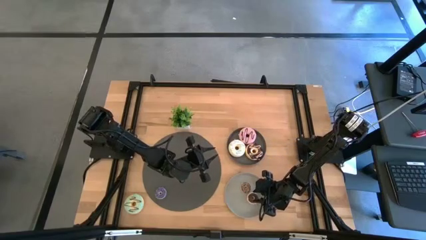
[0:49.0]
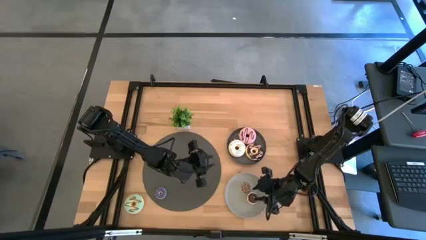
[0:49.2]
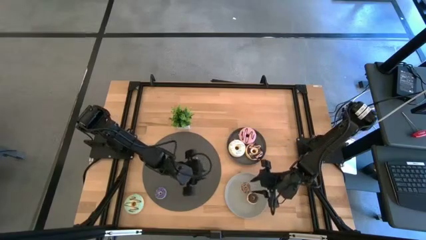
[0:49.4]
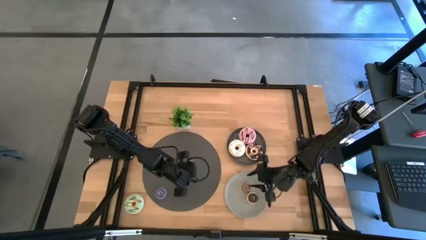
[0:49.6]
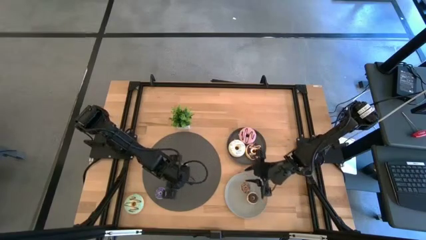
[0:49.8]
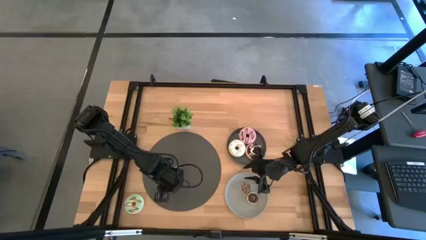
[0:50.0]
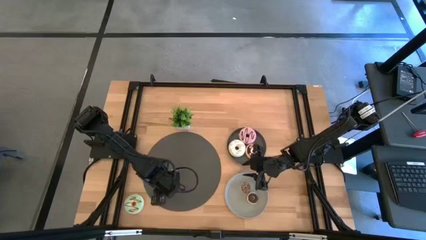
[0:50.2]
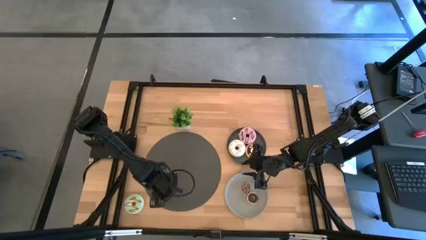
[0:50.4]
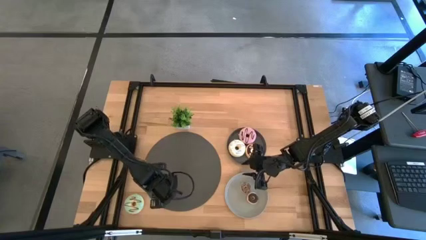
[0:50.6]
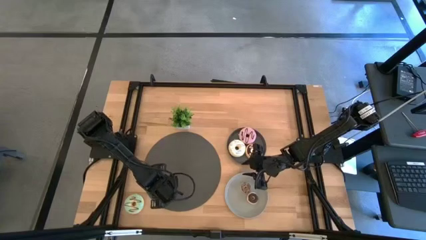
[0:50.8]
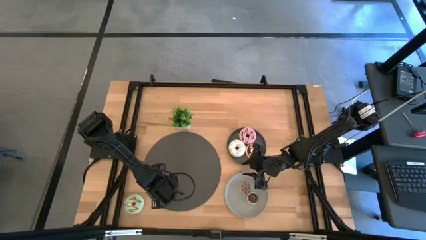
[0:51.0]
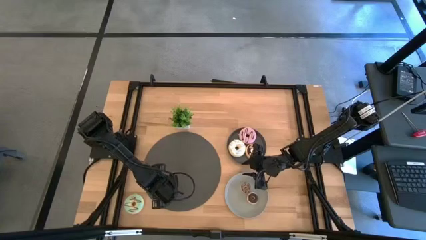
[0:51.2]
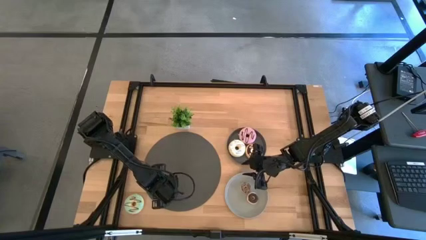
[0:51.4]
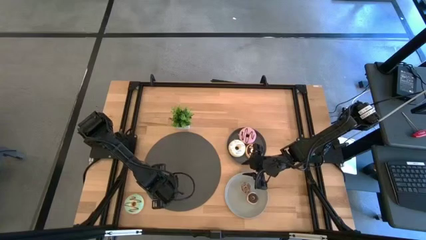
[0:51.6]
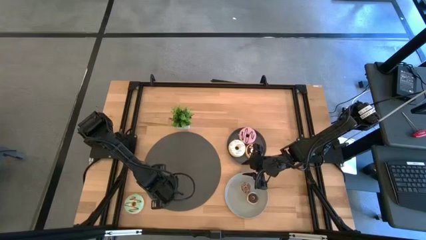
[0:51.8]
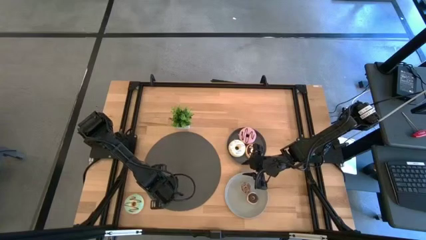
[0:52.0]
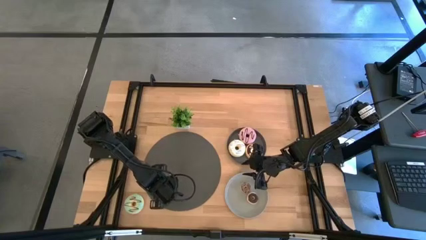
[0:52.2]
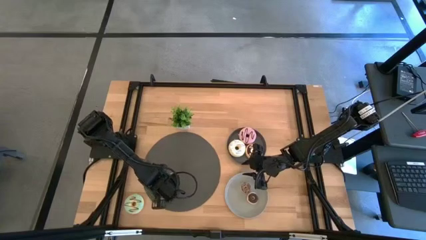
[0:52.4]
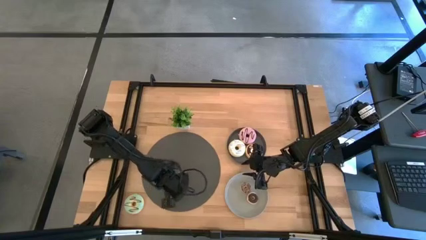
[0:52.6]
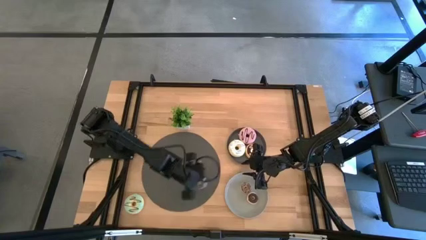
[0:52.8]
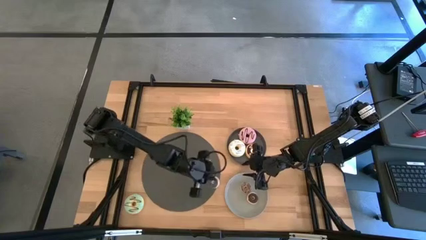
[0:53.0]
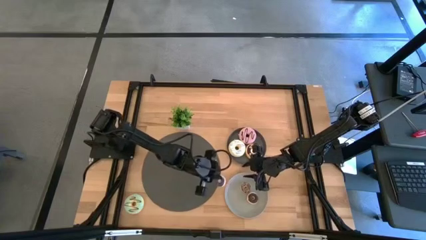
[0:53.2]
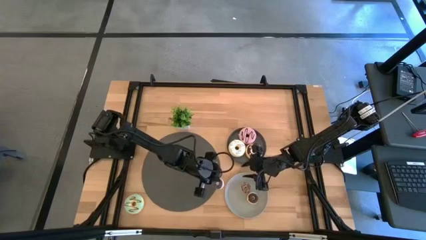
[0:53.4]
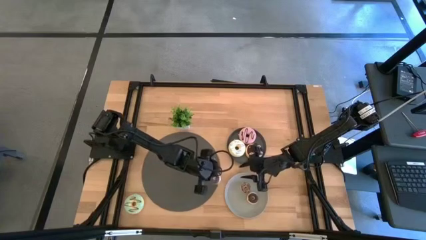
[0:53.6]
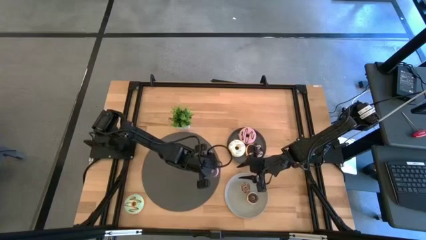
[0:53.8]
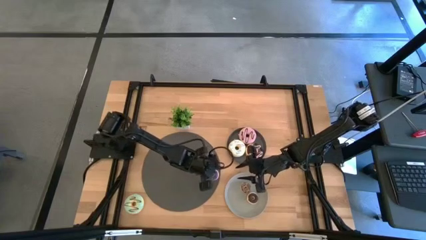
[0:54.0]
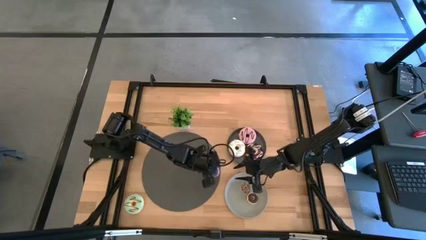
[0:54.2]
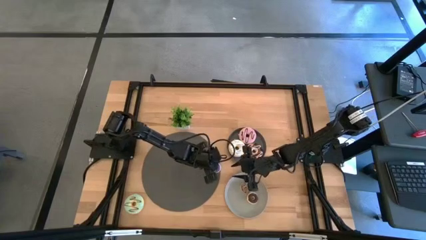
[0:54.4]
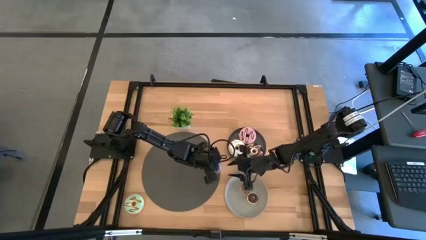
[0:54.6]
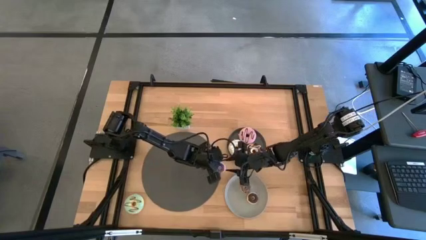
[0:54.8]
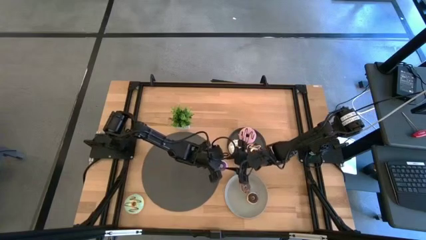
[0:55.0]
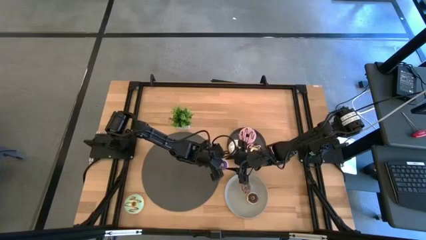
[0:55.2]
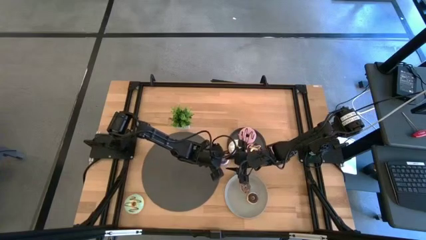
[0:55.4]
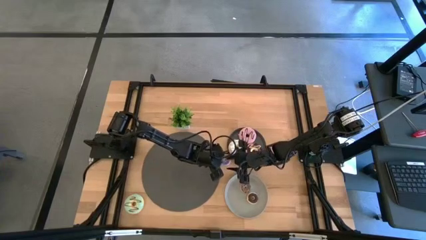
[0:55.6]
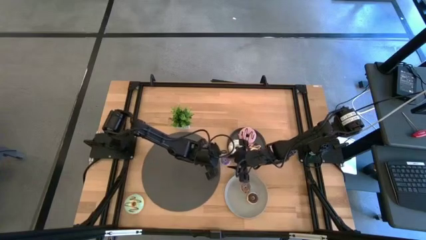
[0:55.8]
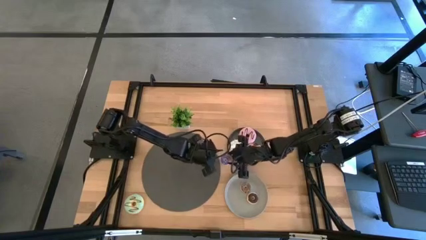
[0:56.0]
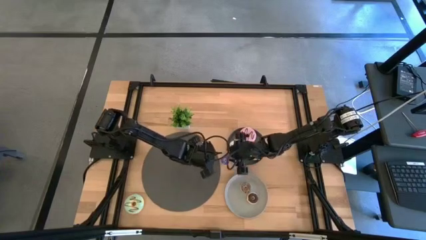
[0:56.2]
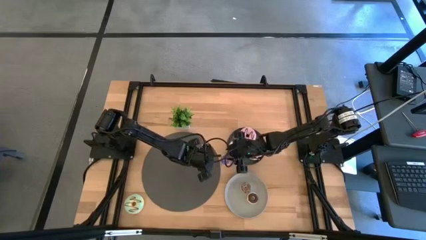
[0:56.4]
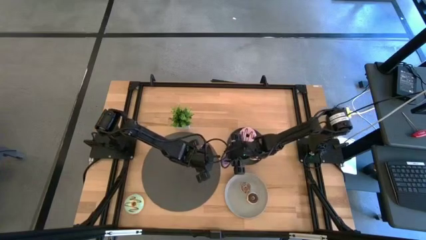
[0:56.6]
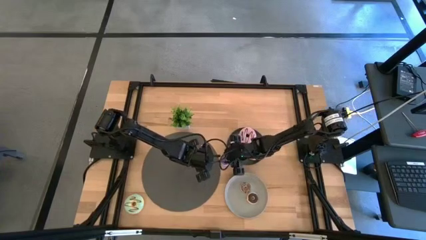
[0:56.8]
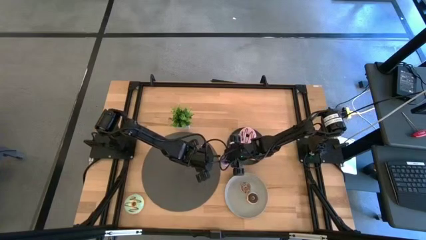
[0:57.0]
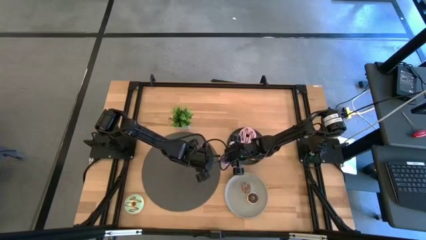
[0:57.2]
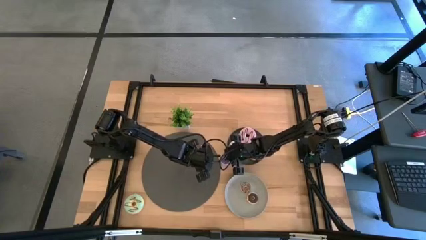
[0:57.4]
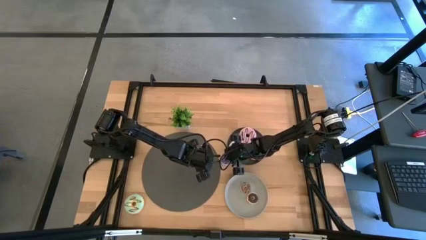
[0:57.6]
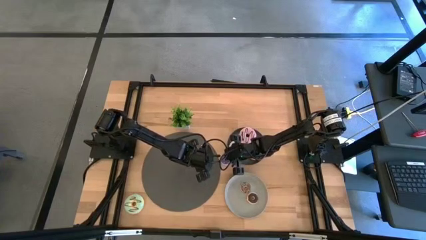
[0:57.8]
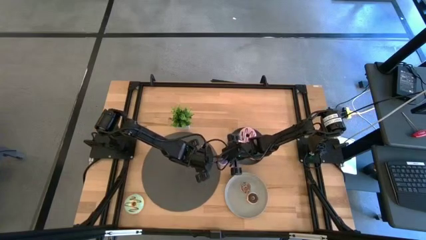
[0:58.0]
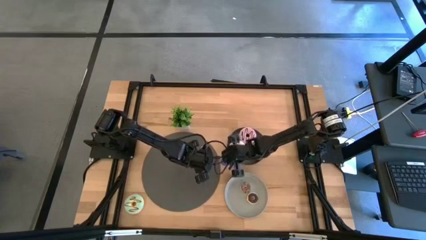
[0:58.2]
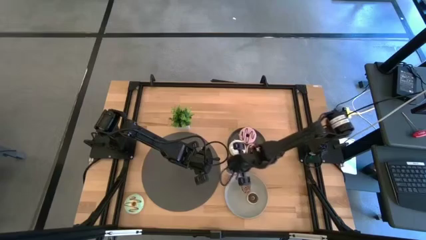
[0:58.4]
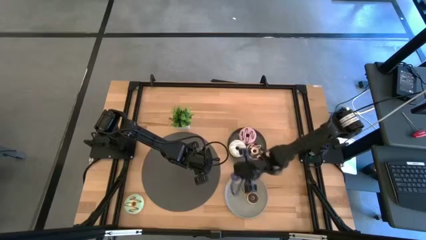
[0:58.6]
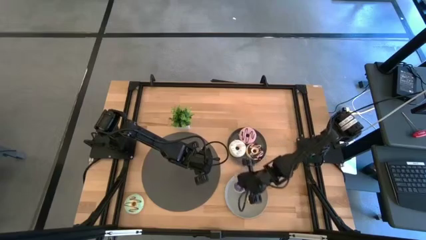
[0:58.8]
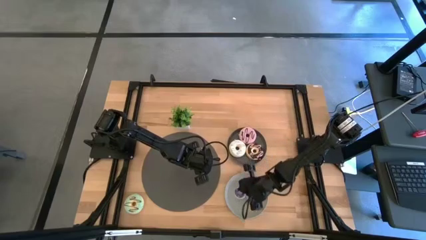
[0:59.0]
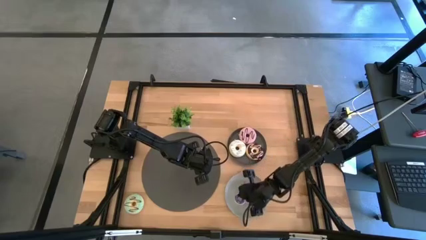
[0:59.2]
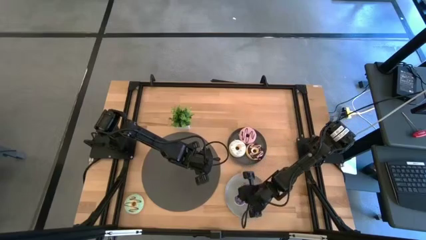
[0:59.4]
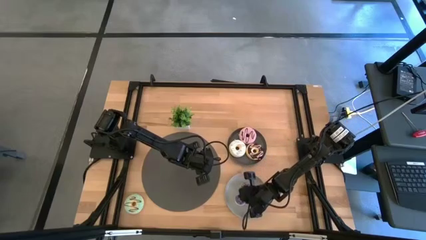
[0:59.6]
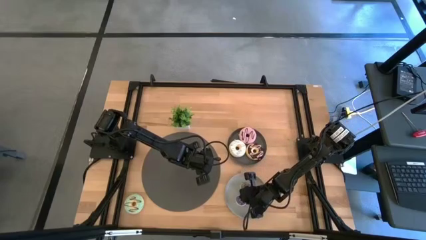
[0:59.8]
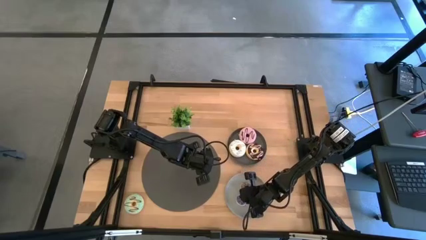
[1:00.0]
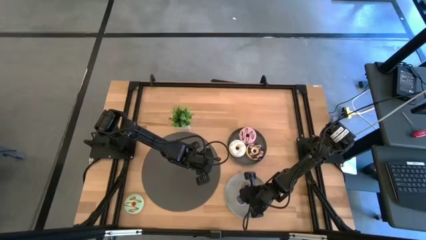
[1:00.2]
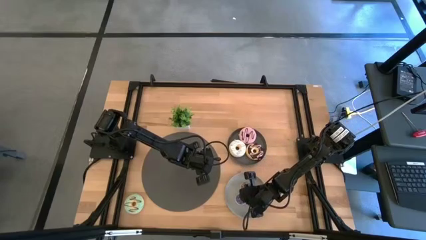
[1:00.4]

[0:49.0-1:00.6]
Task: Pick & Place donuts
Put the small blue donut on the gray plate

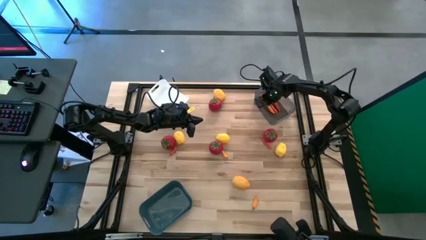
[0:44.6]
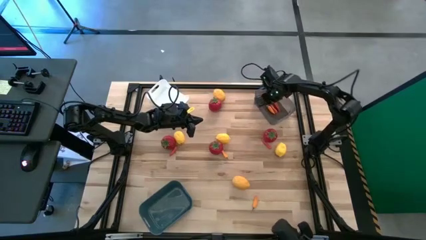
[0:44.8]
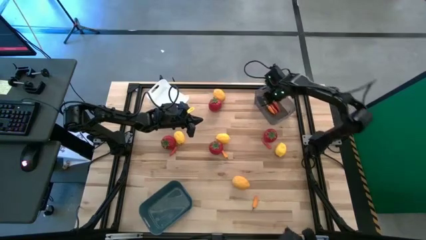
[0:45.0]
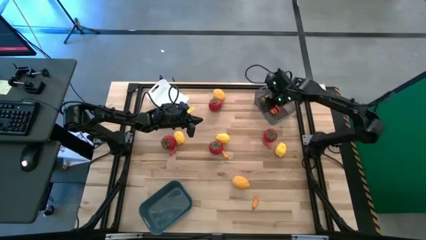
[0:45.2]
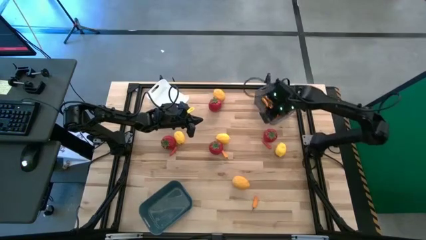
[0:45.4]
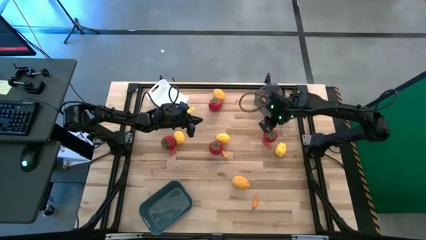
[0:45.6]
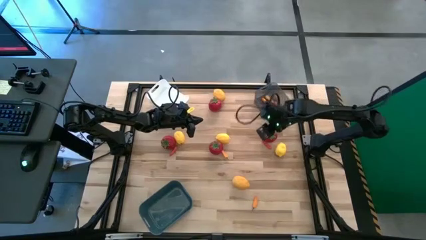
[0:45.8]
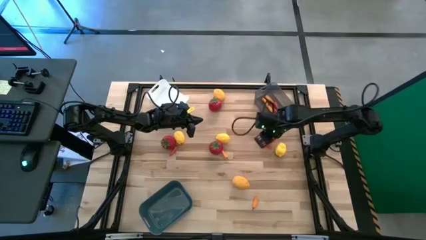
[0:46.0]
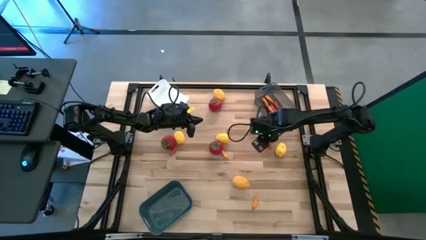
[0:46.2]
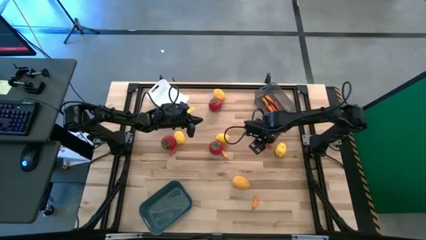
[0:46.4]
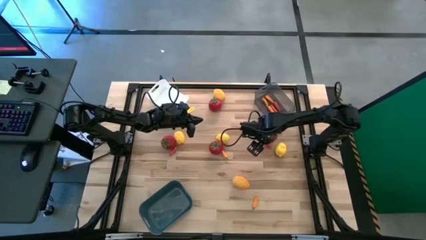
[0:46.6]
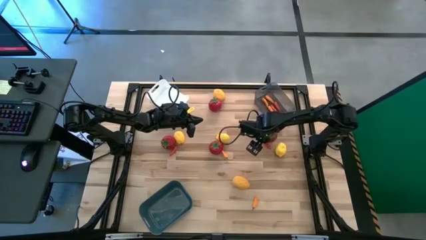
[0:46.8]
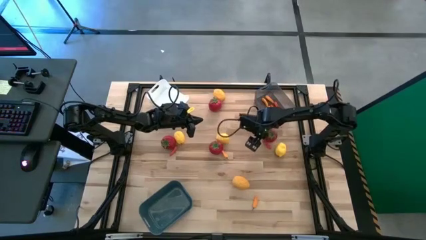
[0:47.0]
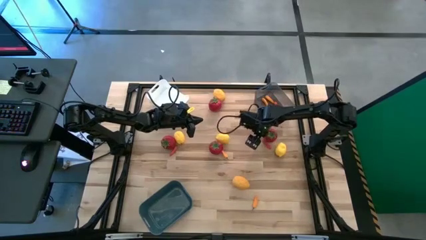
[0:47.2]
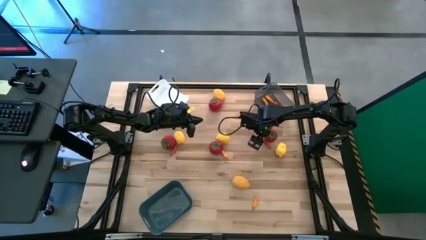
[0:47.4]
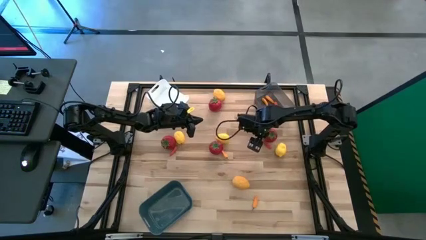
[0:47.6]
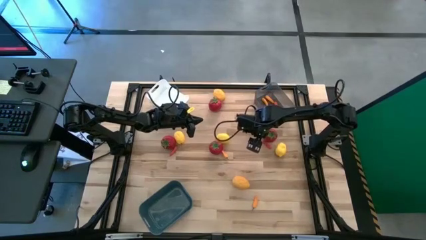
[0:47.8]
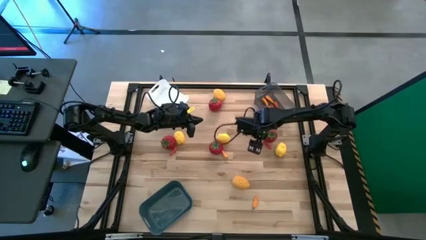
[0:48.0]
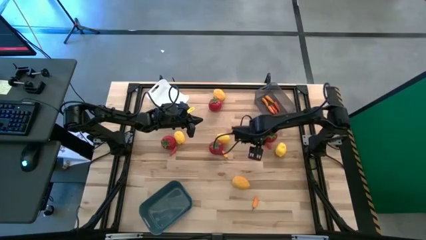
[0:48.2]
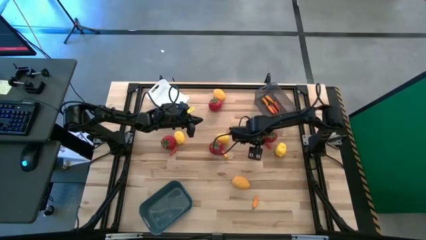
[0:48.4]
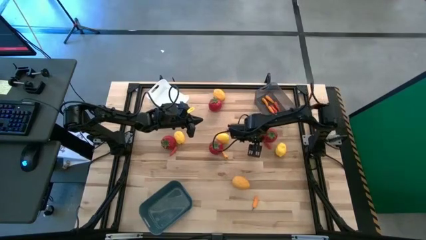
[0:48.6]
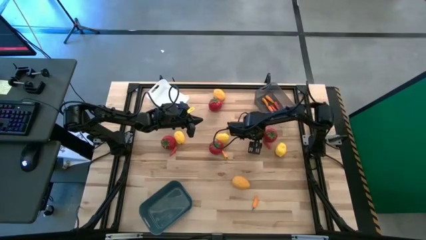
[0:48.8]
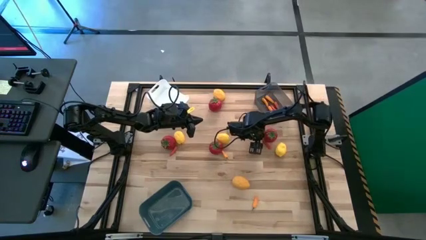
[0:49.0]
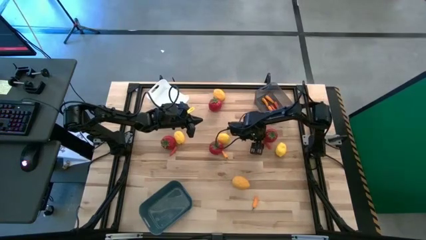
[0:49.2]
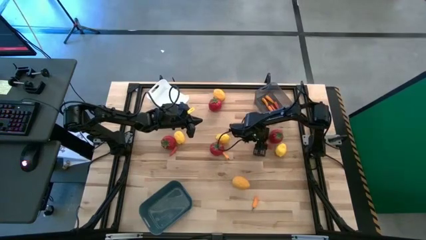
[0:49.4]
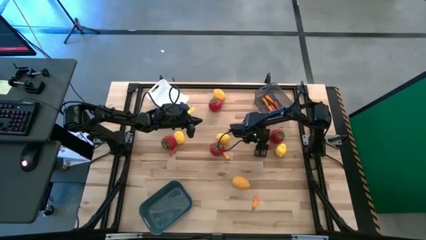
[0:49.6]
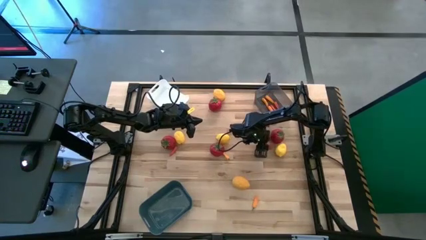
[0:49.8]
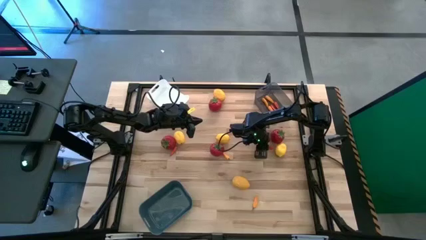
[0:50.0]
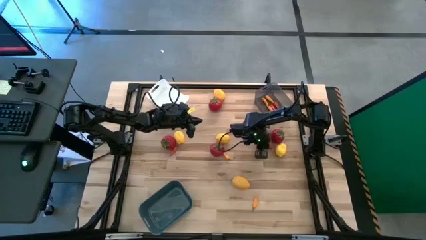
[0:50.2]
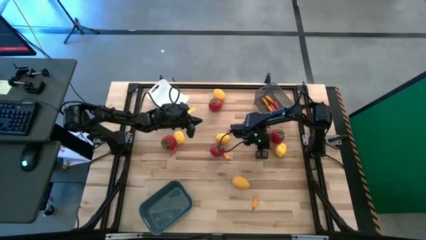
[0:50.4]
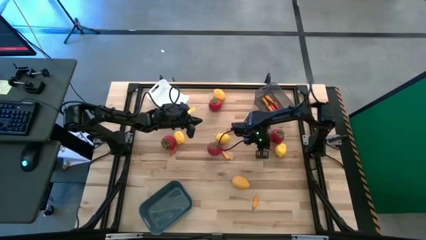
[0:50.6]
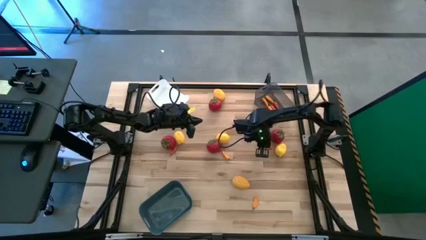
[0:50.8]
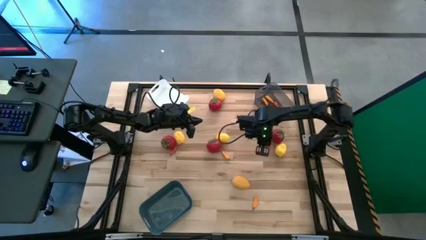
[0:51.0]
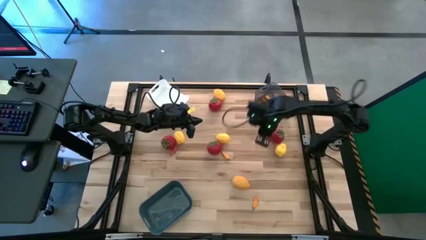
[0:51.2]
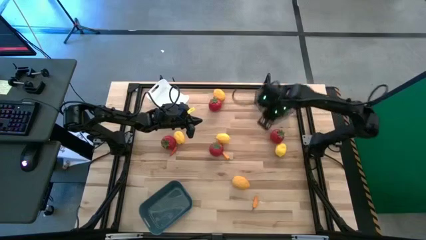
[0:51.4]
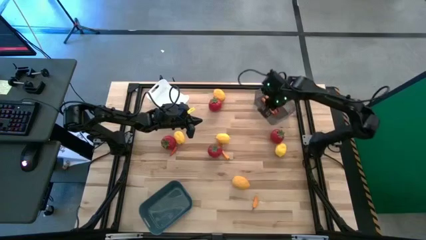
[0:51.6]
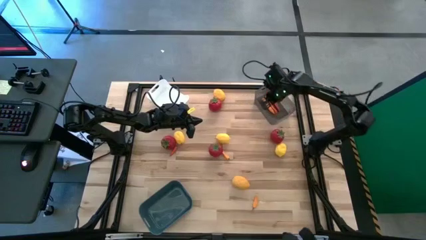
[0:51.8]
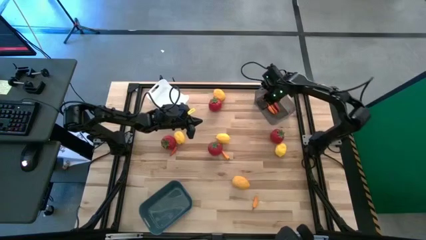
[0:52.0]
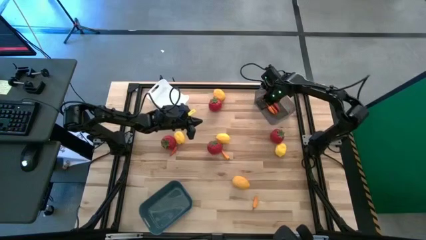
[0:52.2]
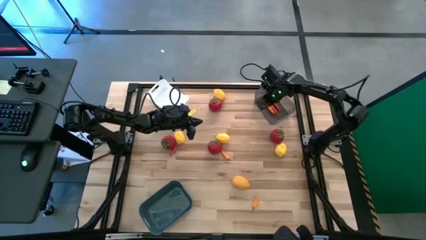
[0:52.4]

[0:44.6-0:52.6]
Task: Sort produce into baskets
Put the red chili pepper into the black transparent bin
